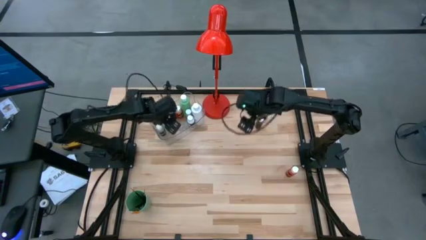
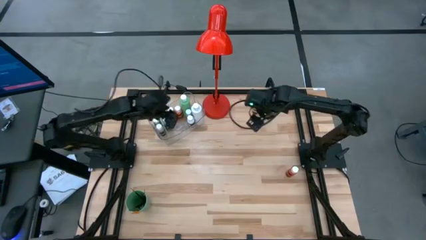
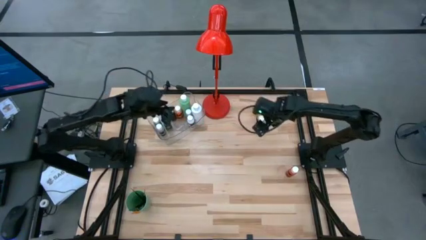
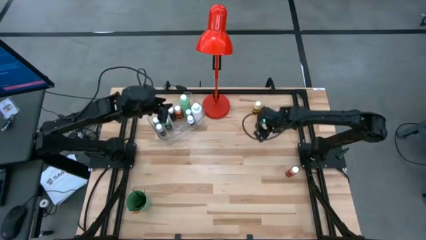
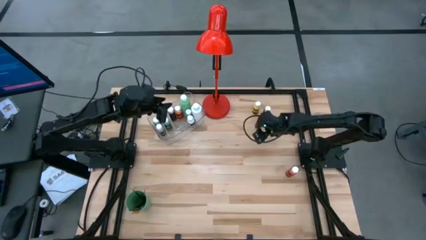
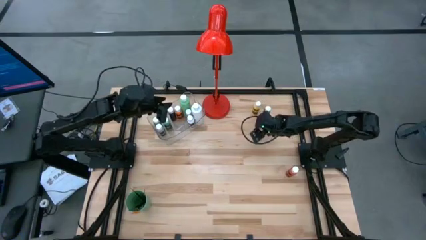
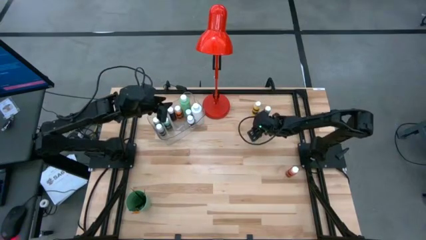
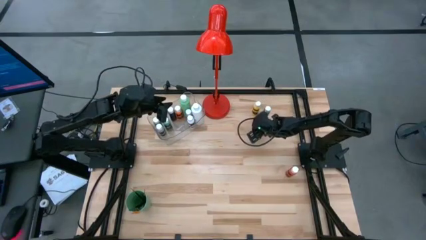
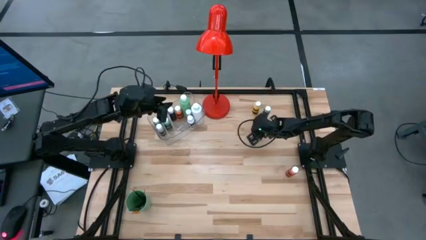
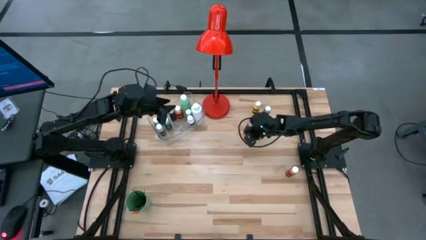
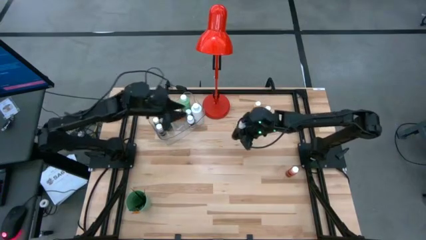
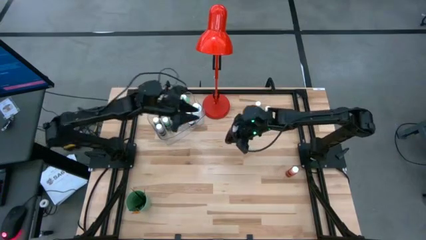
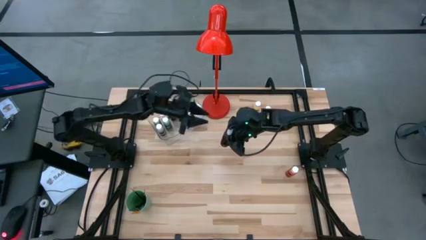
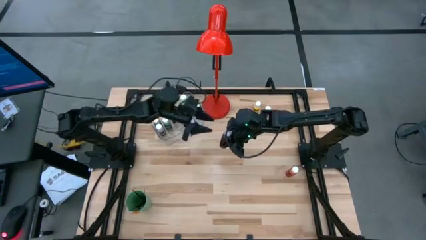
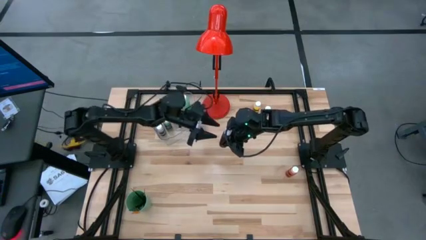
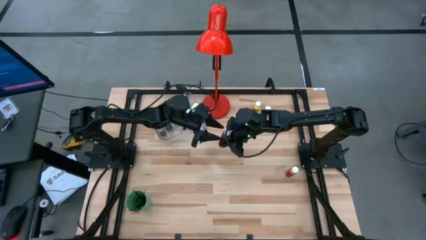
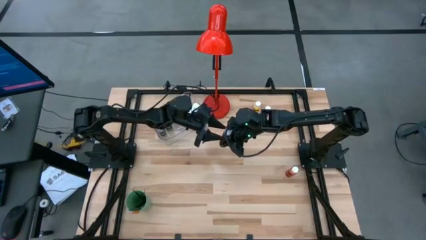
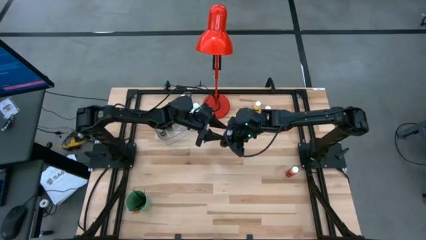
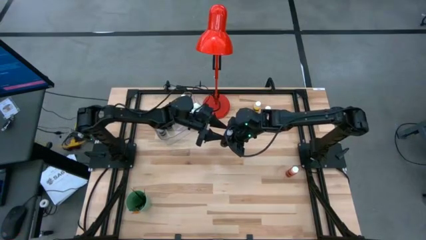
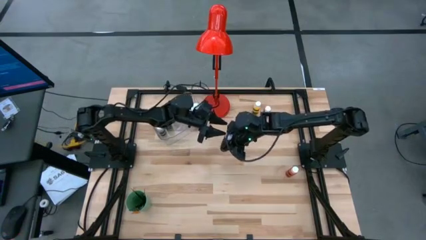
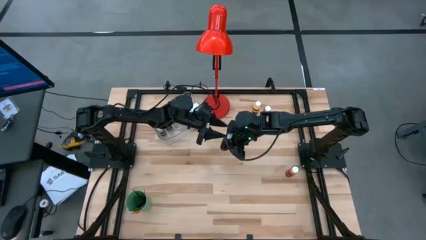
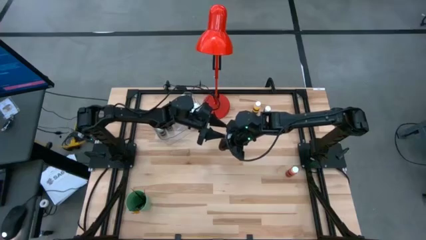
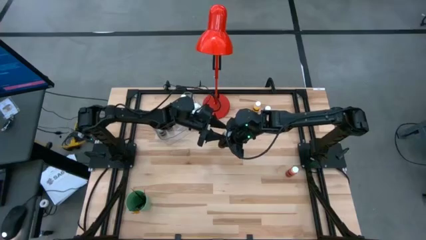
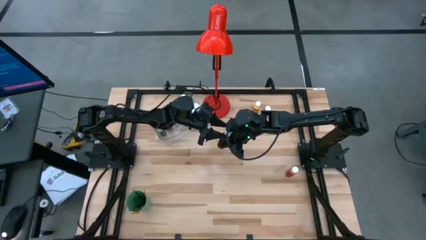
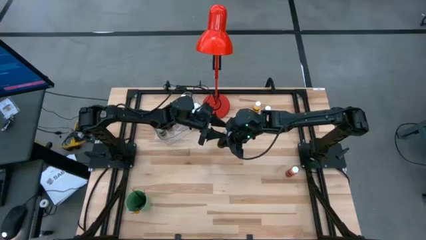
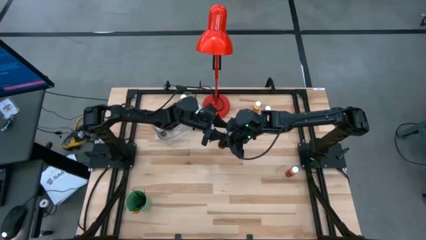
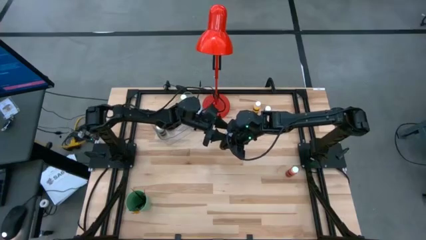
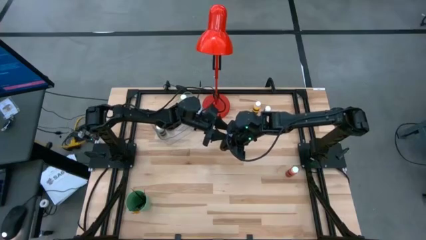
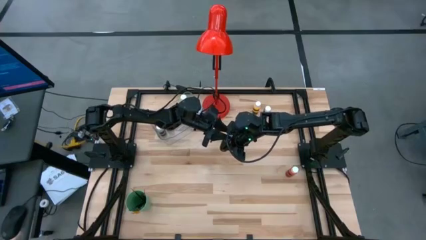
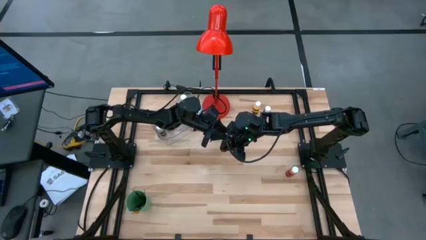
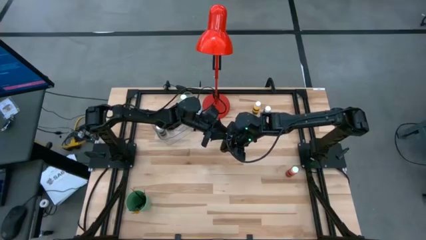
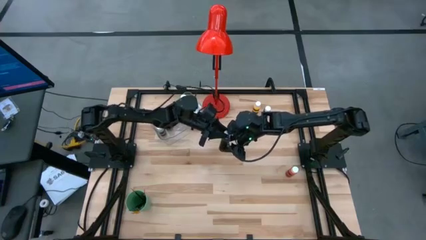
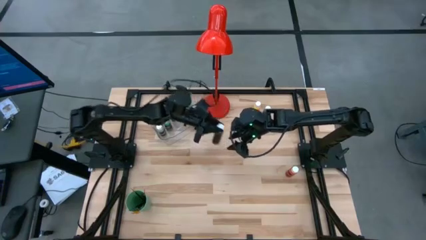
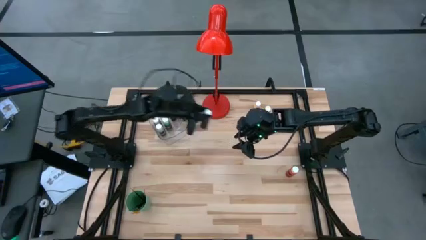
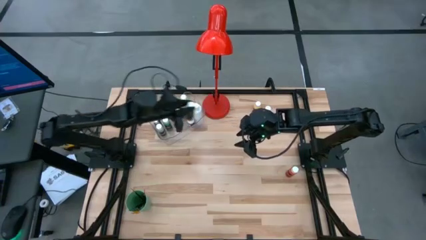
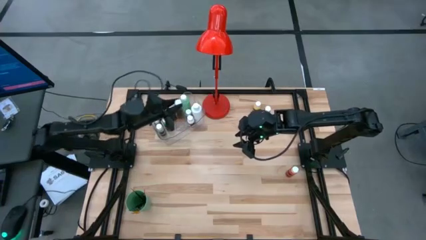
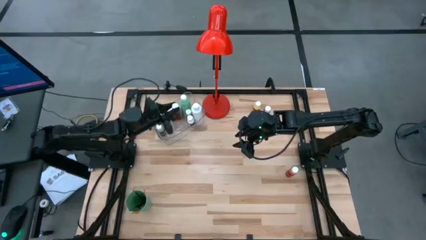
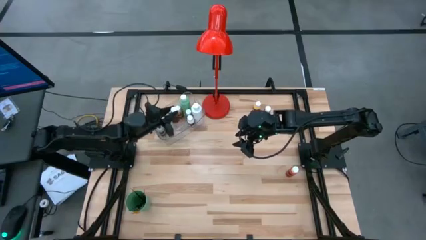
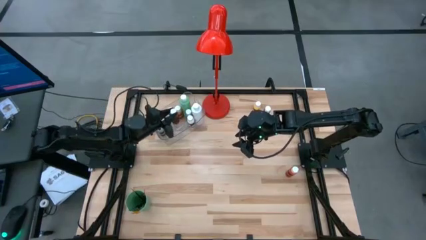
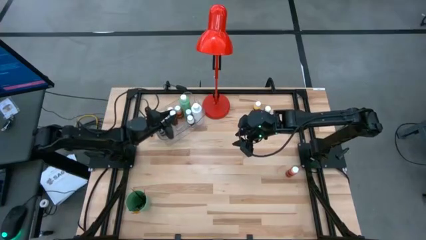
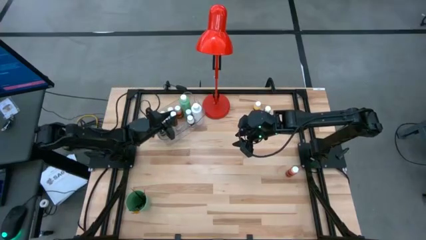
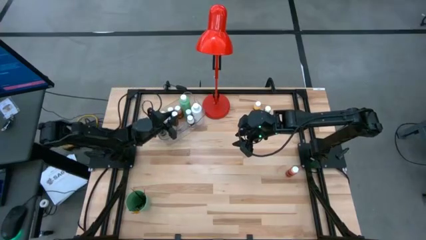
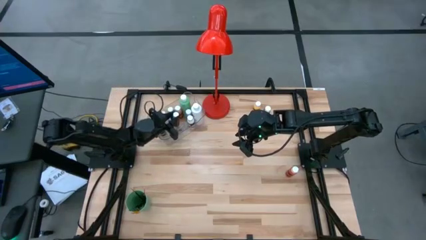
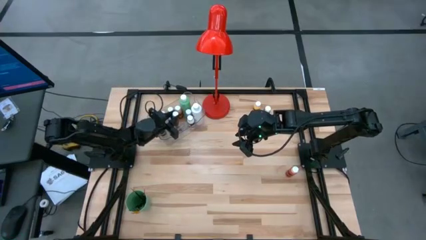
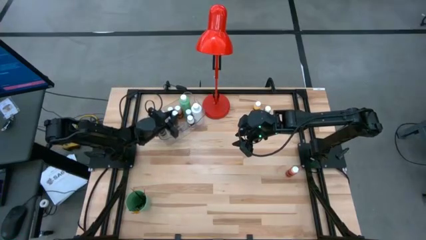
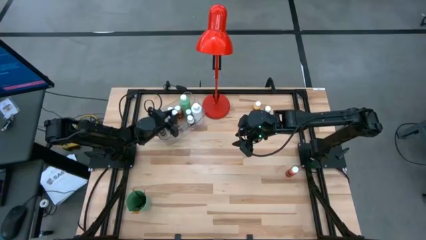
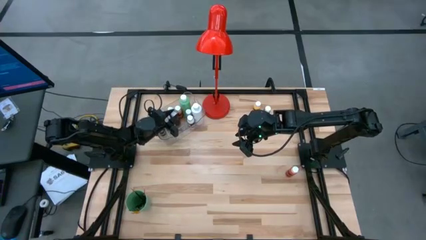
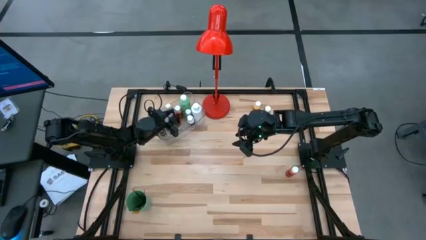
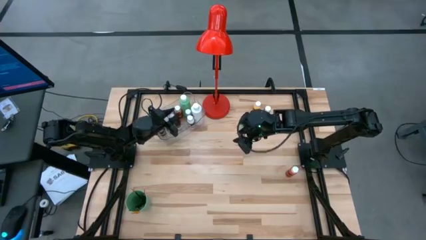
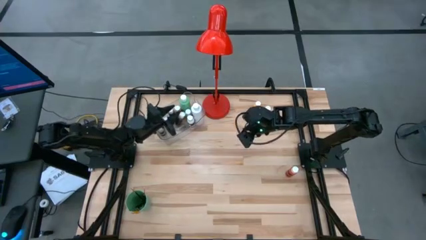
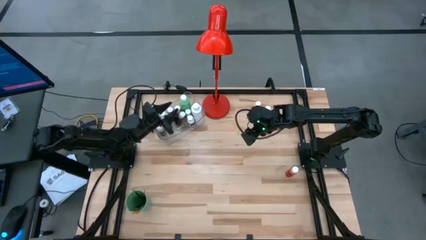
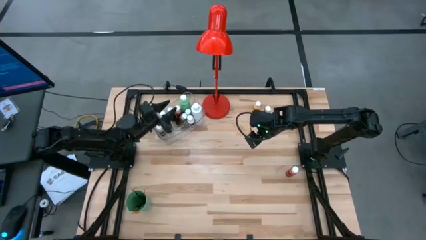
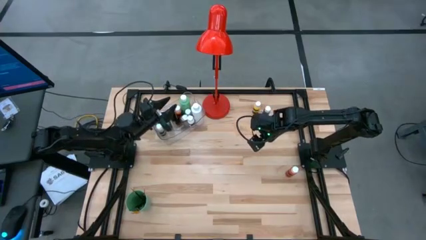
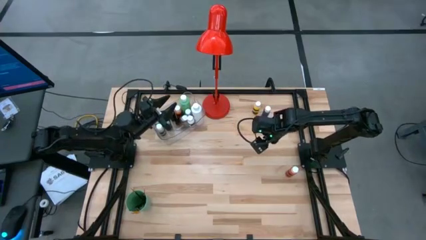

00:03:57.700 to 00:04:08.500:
Task: Pick & Place Paint Supplies
Put the brown paint bottle into the transparent bin
